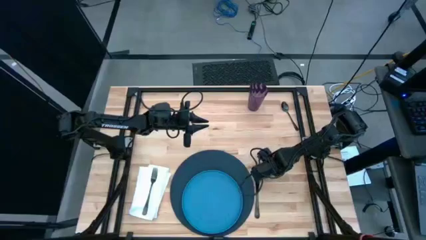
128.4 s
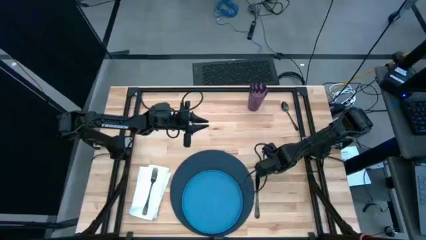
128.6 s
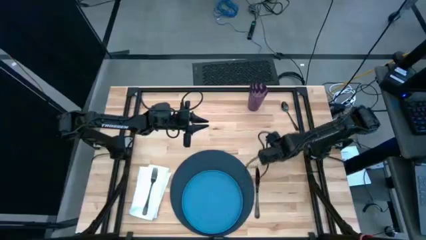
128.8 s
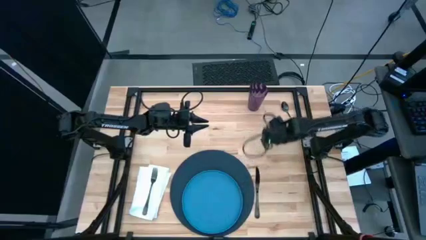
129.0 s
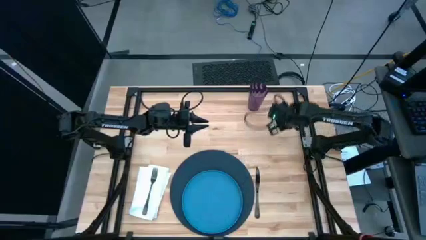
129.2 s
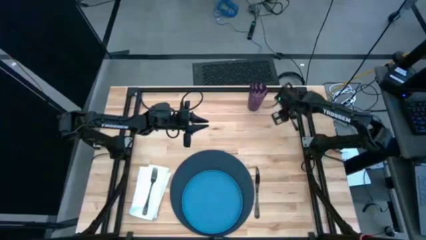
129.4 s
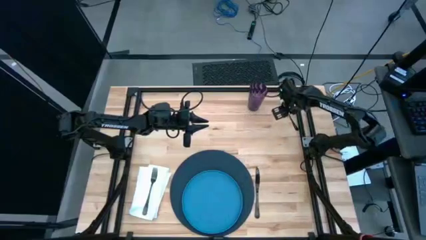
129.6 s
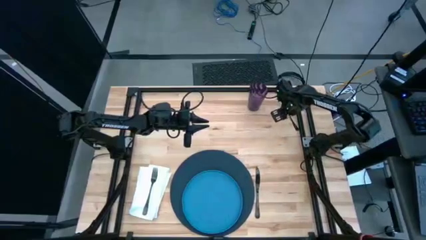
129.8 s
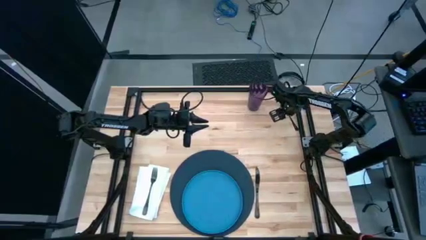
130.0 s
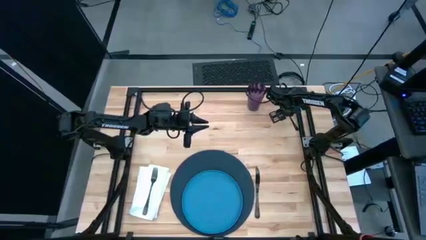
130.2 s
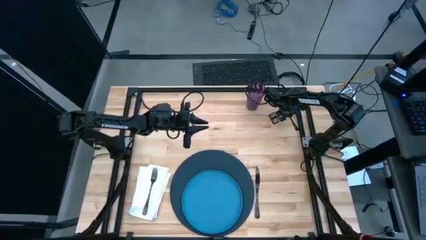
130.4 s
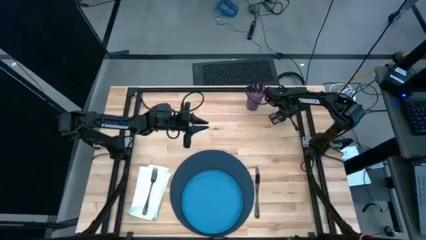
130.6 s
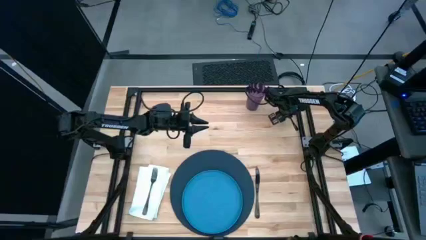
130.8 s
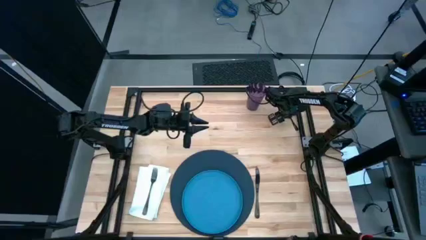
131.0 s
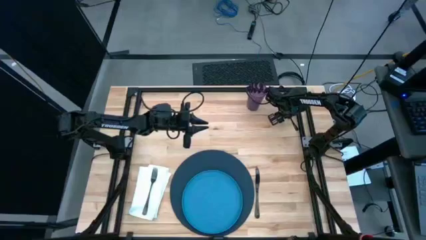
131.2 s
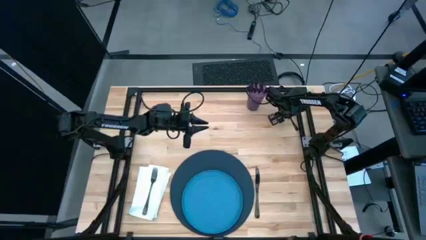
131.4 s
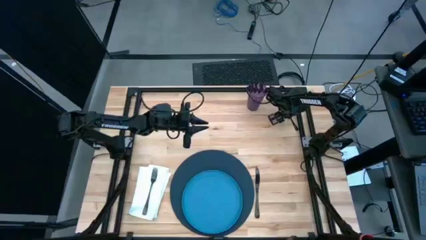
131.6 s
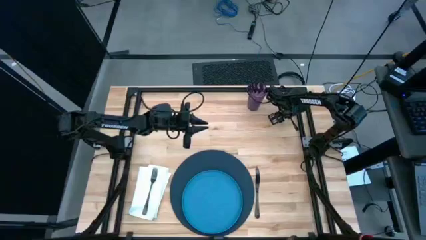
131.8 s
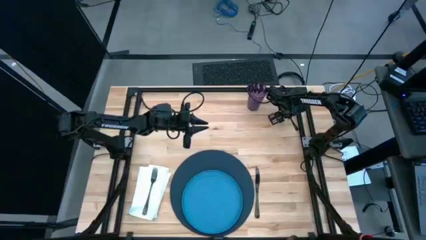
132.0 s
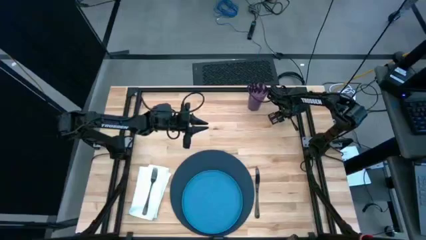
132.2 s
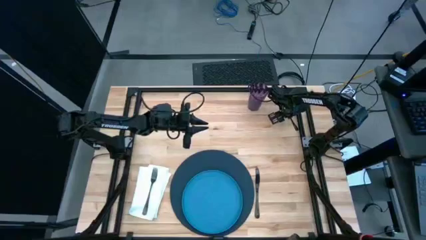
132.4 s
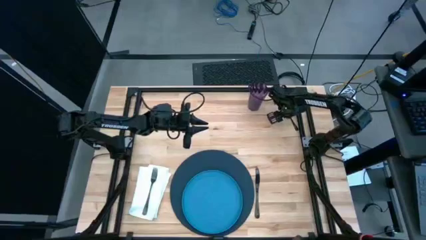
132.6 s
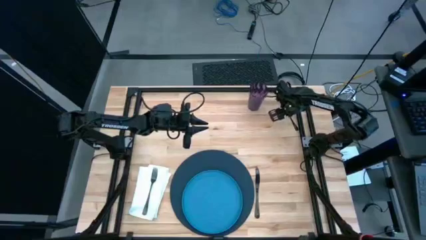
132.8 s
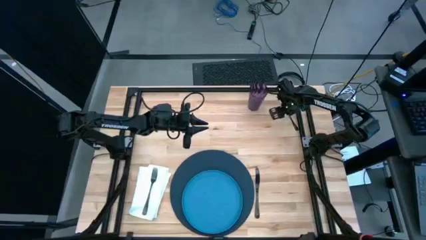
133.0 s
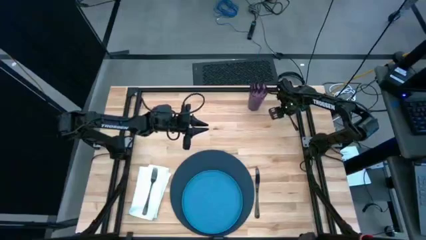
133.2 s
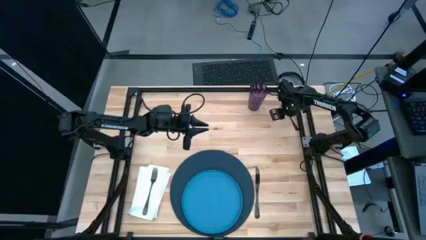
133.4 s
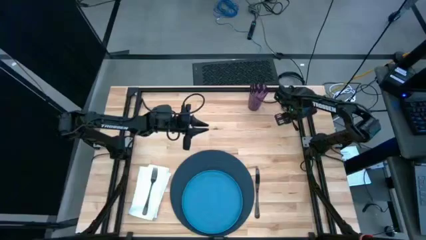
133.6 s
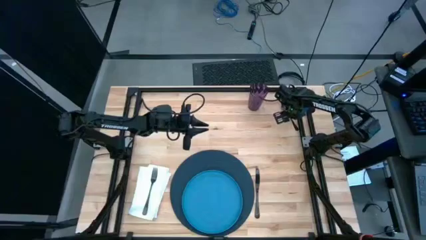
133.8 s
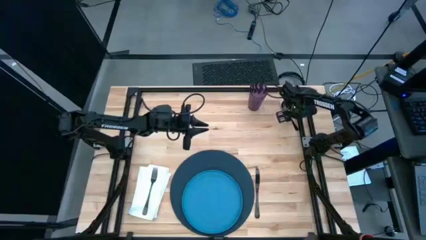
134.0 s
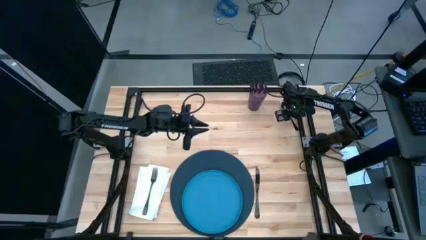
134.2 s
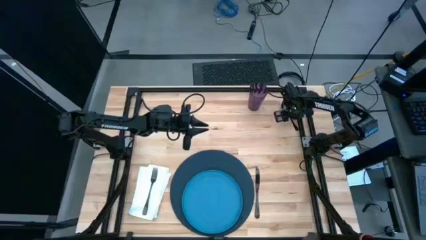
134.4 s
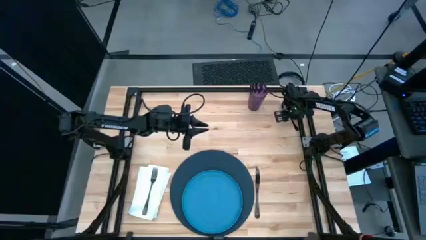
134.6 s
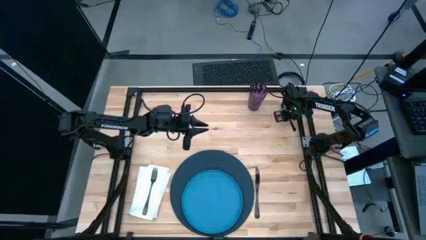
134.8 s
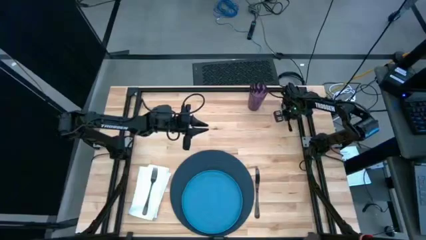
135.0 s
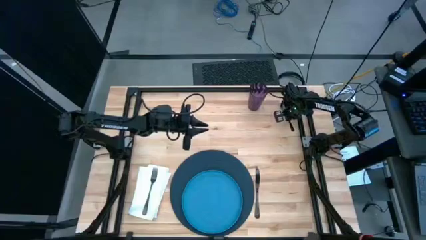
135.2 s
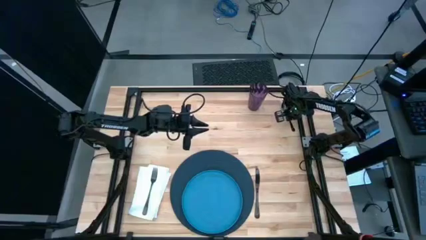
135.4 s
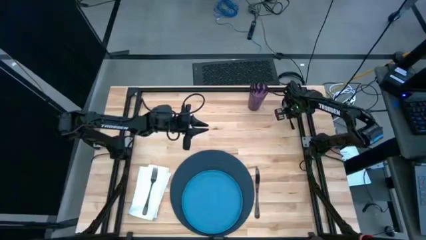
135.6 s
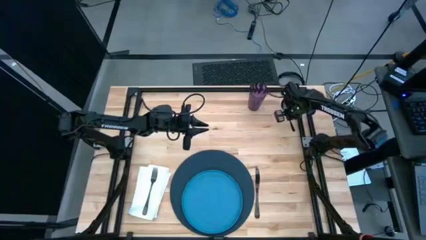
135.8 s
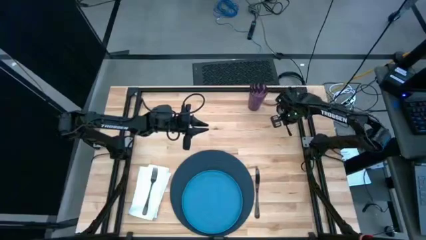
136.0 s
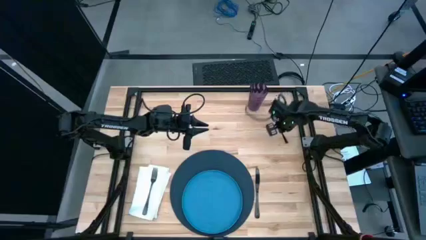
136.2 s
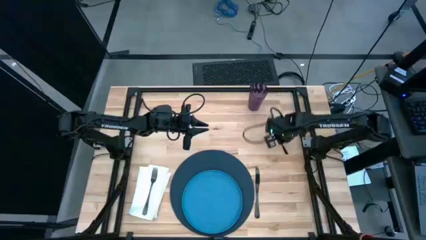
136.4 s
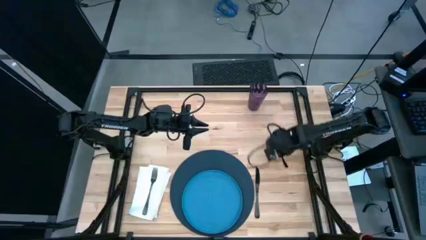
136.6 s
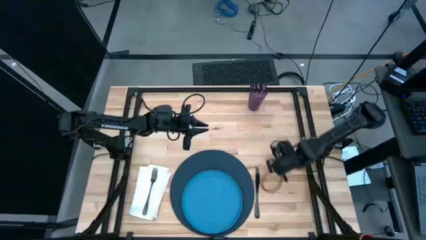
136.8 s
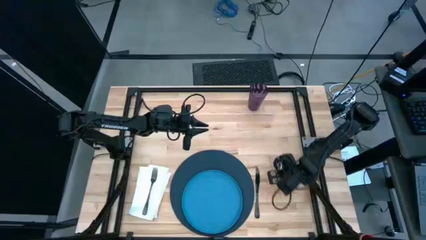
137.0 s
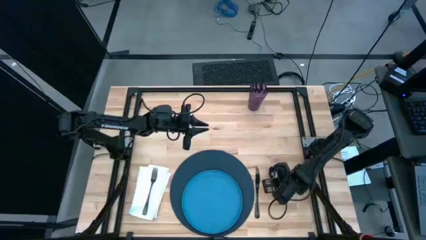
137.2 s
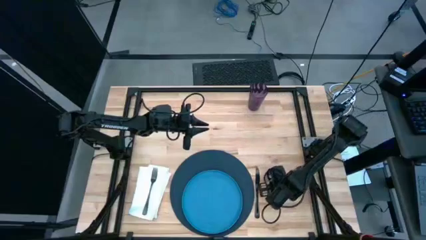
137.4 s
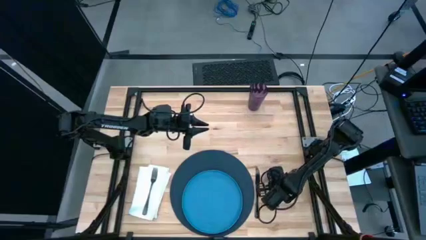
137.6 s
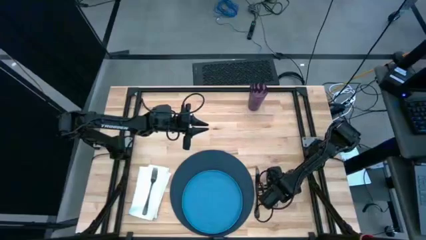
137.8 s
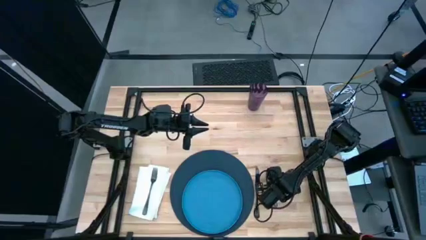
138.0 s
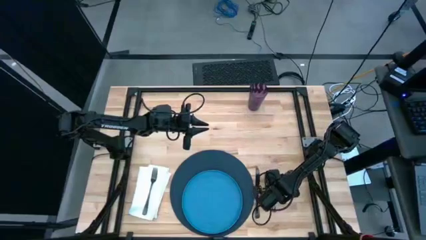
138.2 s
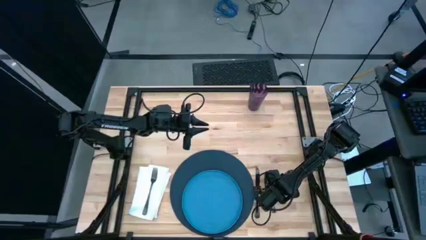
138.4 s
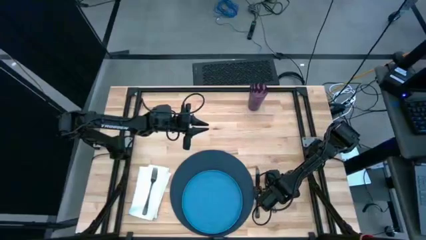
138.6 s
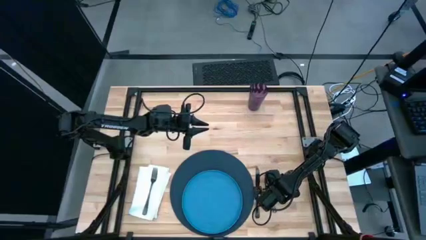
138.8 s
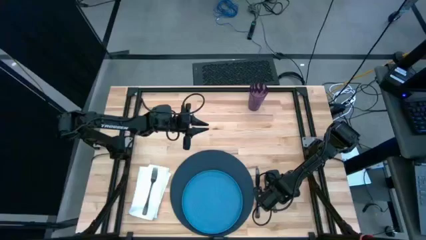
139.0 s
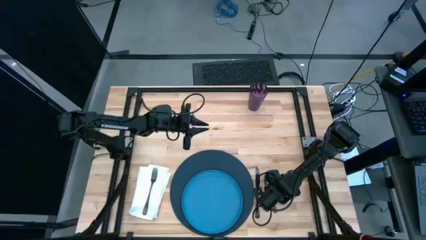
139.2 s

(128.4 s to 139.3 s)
Task: Set table place
Put the spoon beside the table knife

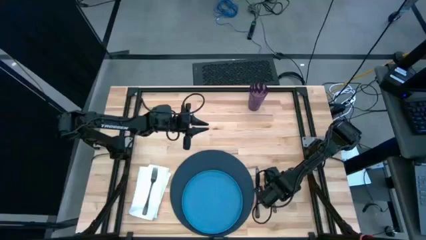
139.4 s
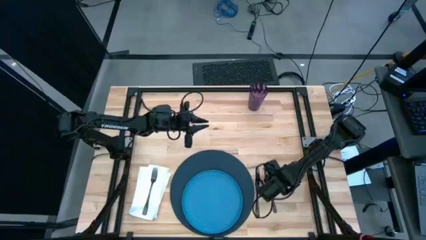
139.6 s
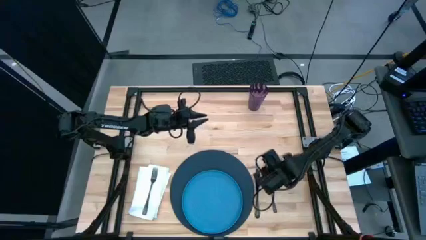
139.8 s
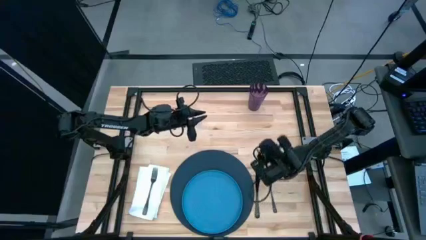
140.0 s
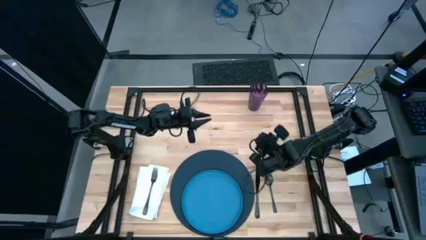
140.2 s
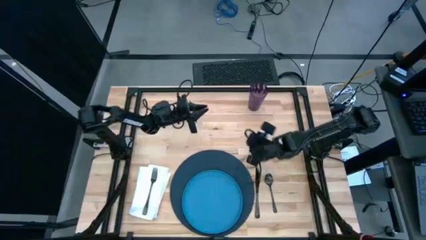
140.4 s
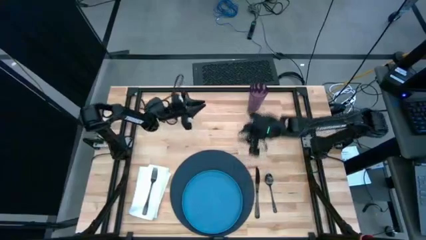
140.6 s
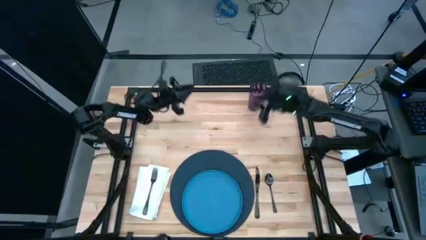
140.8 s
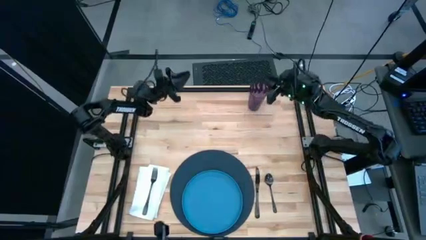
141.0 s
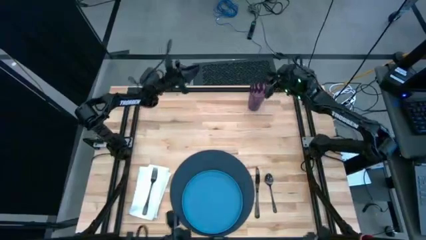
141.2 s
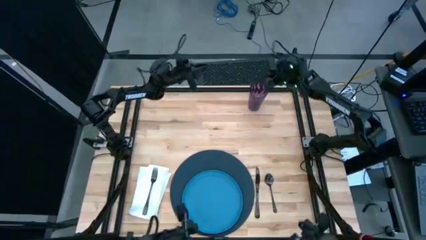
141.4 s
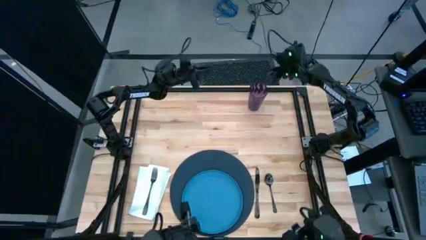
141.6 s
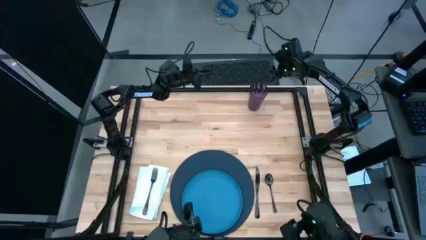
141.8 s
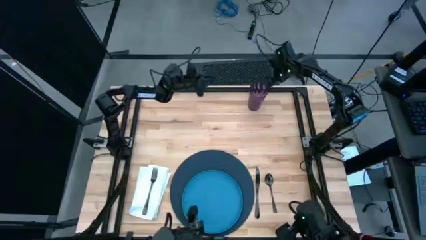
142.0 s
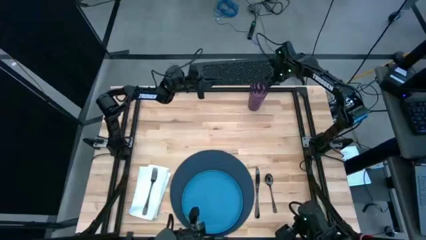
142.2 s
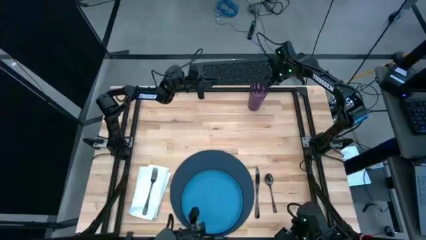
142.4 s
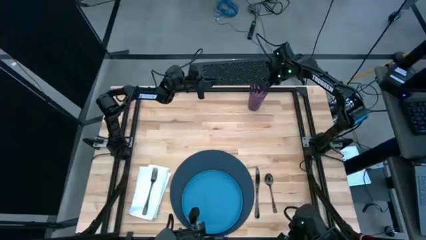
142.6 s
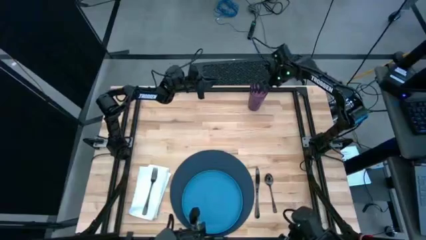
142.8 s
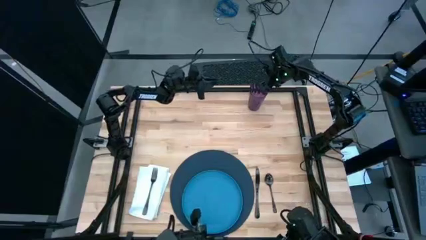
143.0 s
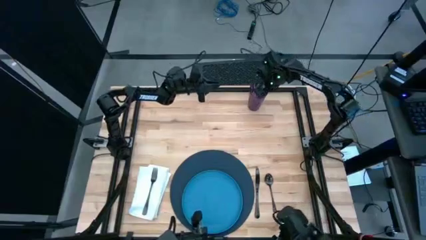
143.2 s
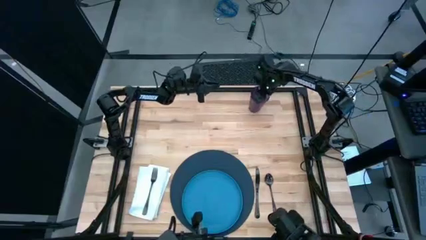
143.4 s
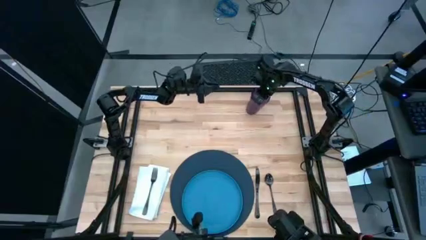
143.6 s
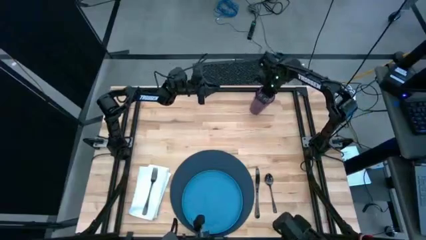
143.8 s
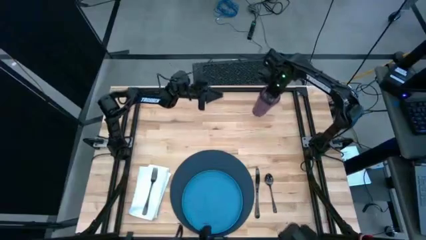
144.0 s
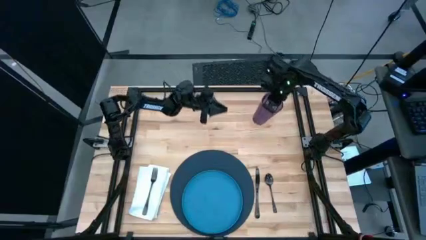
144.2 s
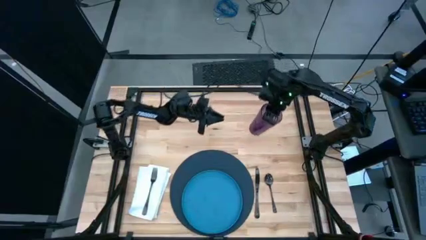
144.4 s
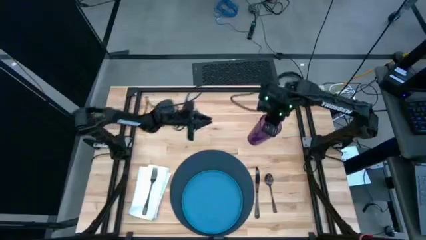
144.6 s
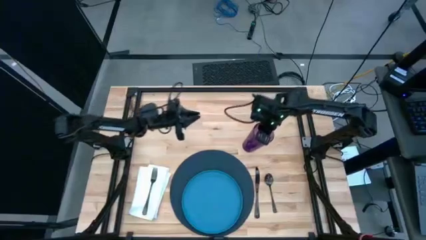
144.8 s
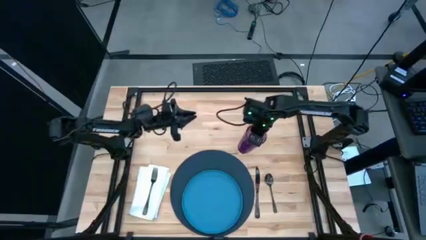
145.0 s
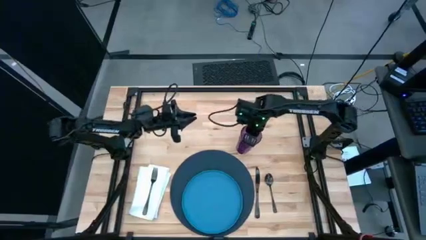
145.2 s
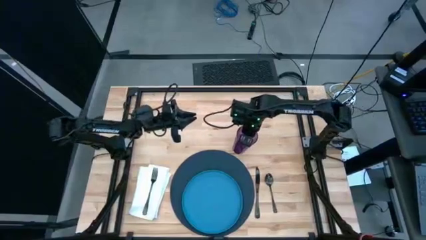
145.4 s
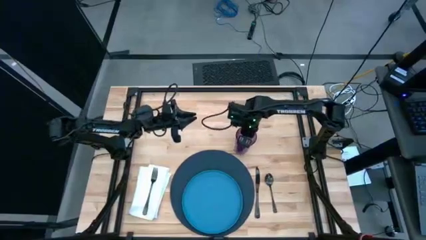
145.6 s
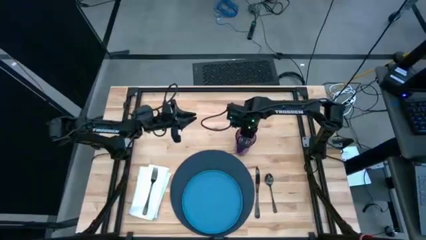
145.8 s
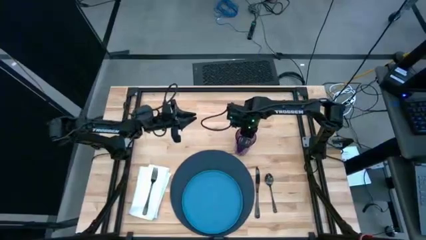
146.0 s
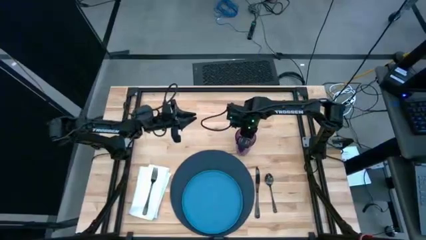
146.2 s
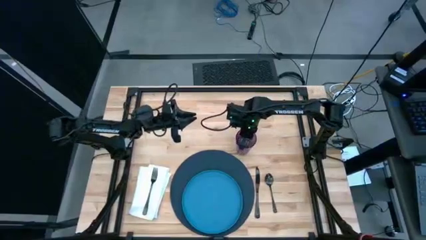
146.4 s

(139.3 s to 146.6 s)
Put the cup on the top right of the placemat
